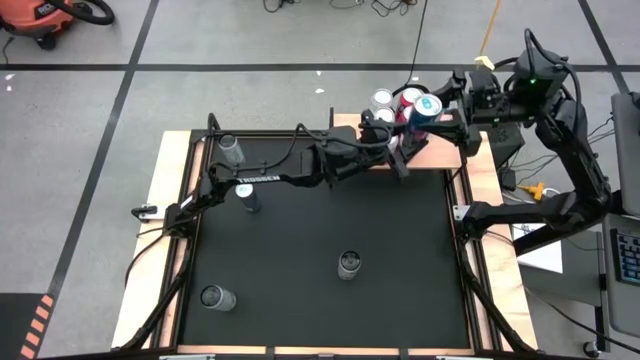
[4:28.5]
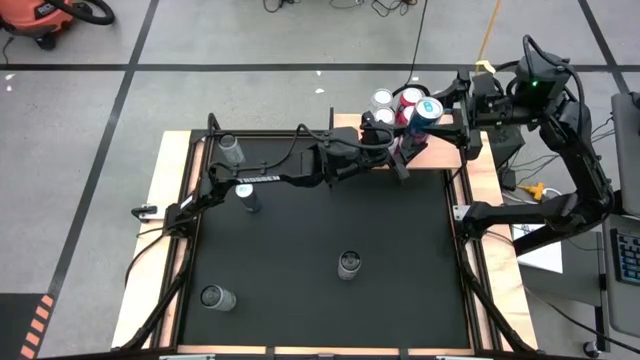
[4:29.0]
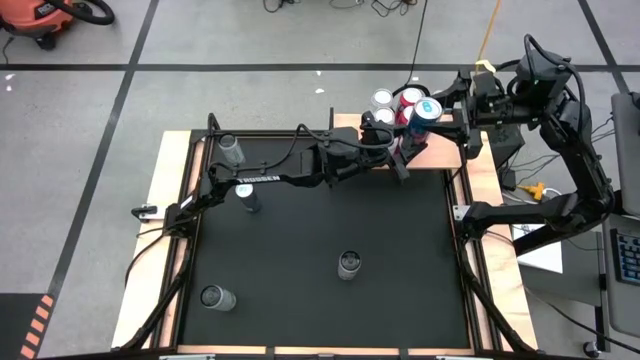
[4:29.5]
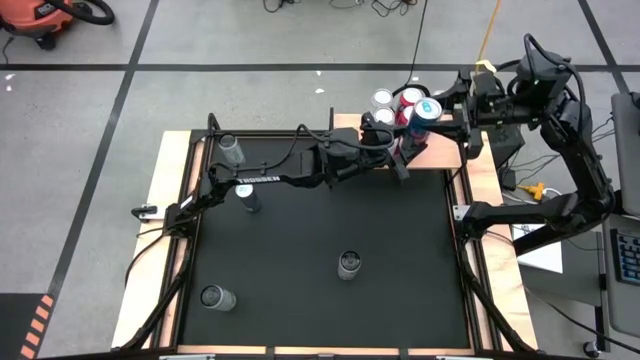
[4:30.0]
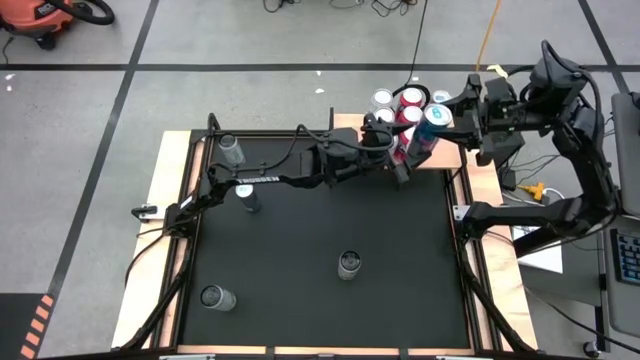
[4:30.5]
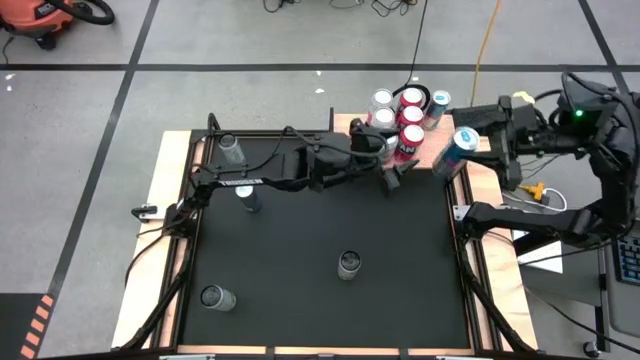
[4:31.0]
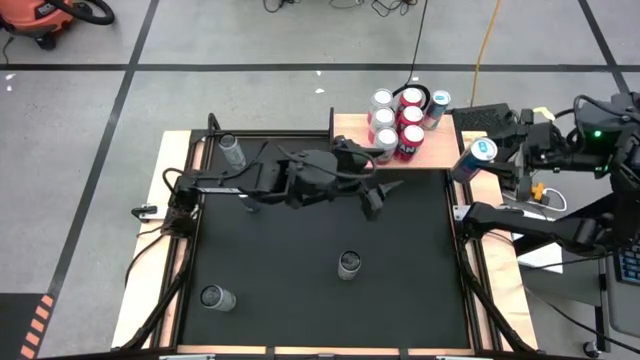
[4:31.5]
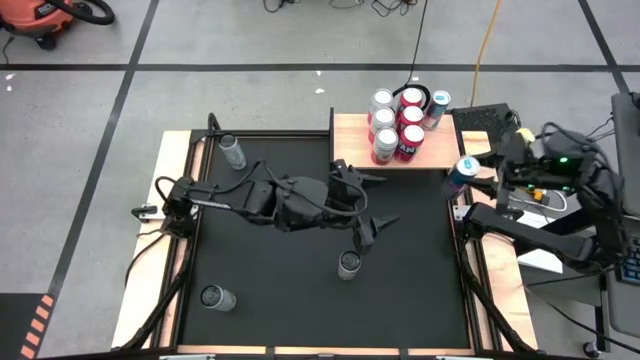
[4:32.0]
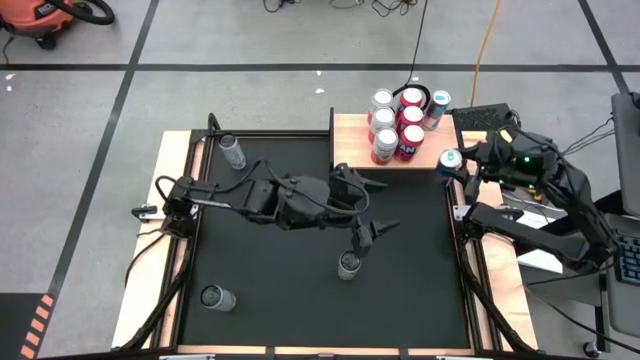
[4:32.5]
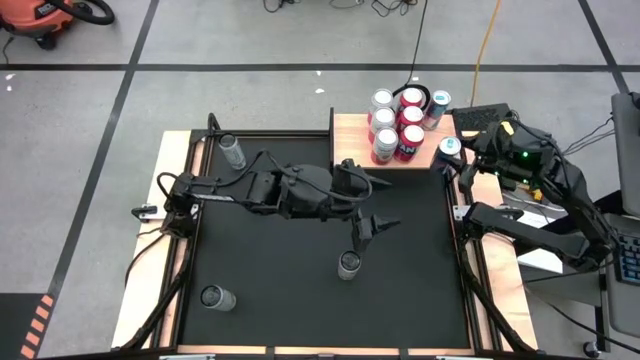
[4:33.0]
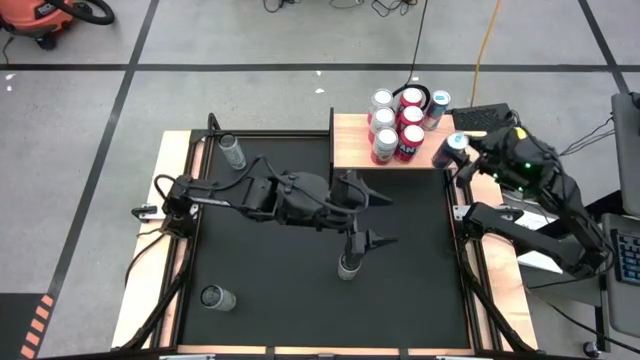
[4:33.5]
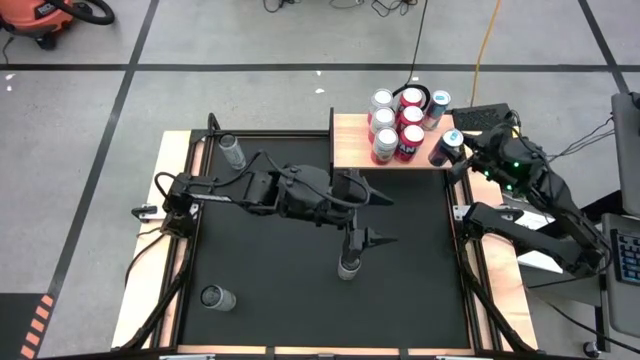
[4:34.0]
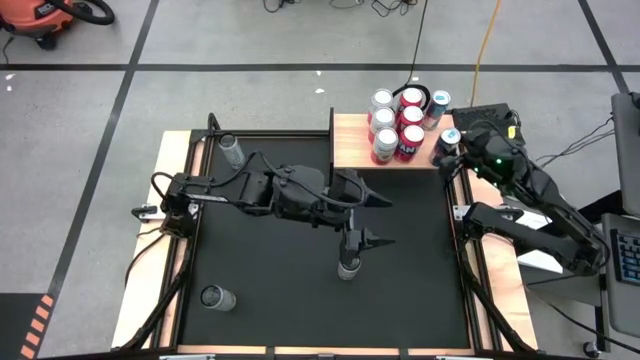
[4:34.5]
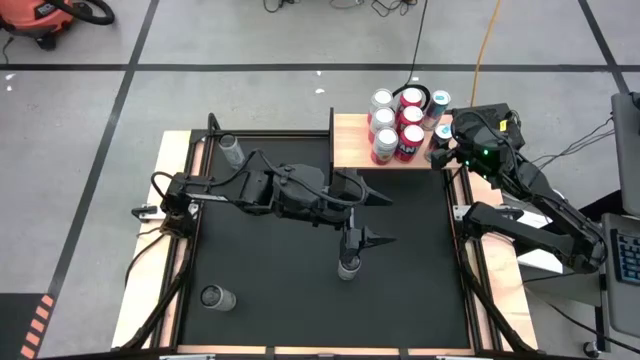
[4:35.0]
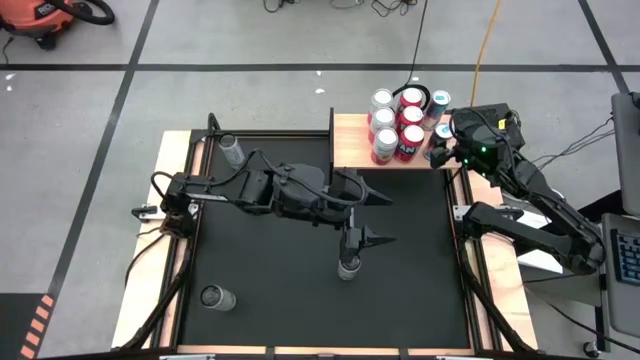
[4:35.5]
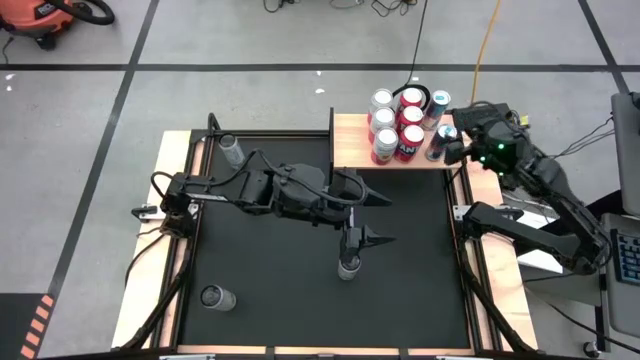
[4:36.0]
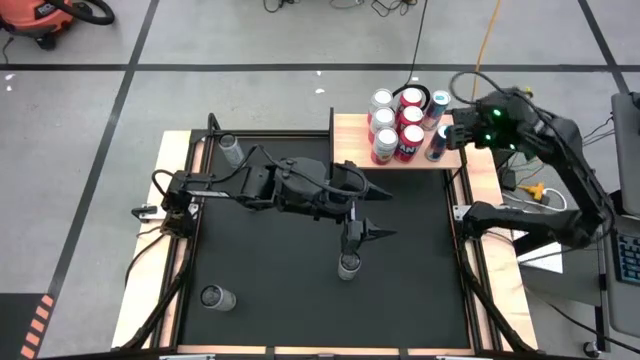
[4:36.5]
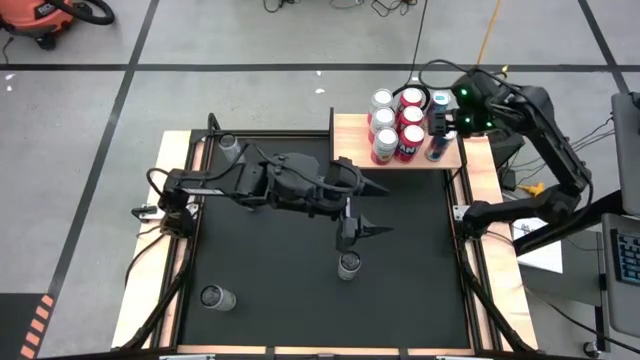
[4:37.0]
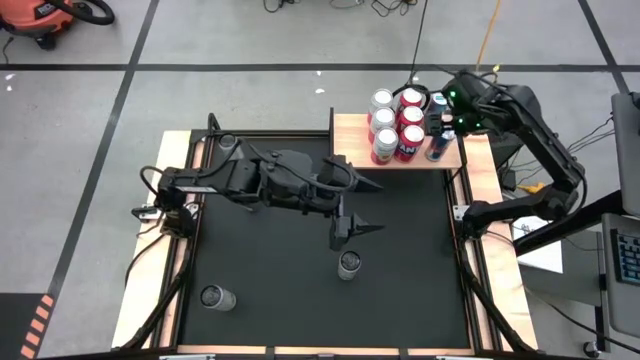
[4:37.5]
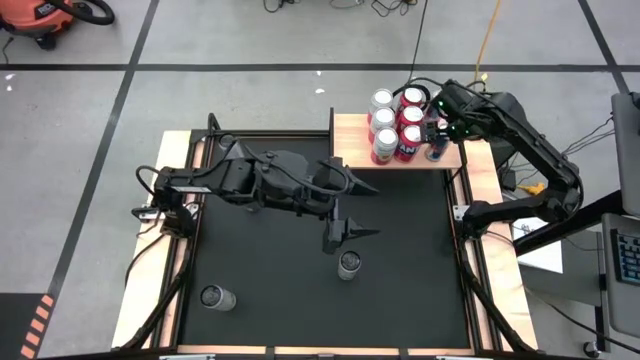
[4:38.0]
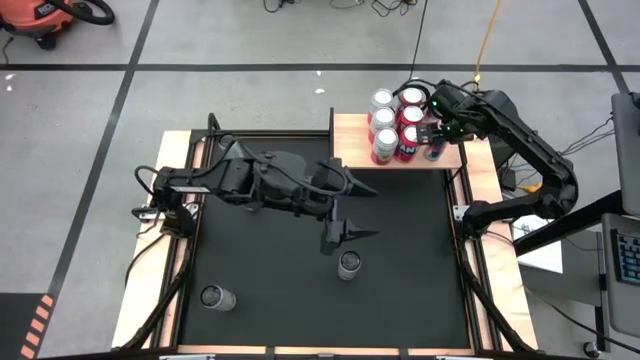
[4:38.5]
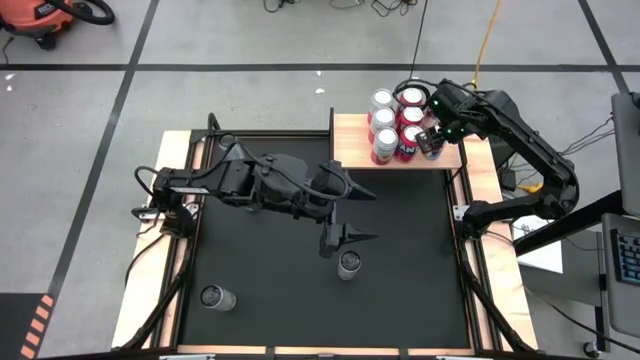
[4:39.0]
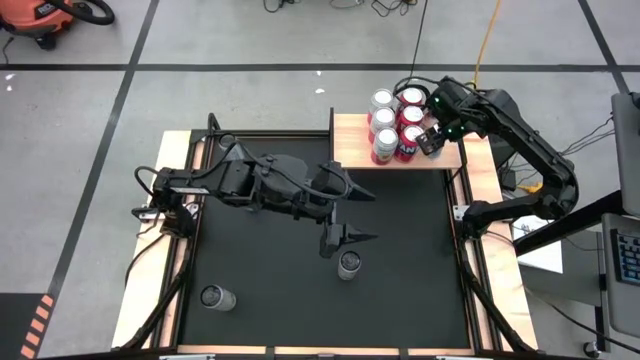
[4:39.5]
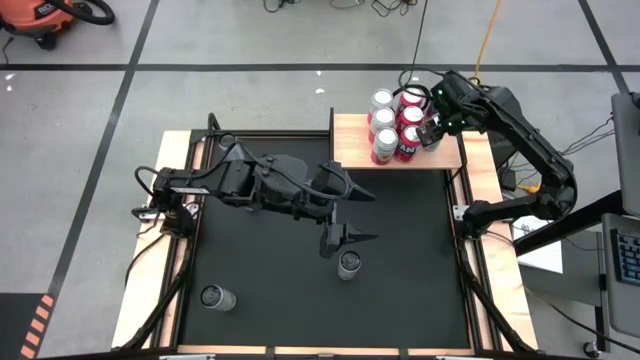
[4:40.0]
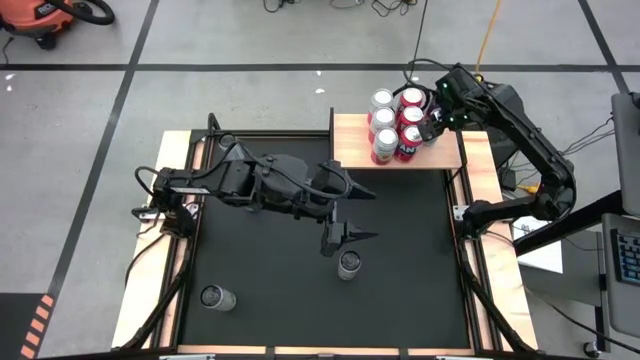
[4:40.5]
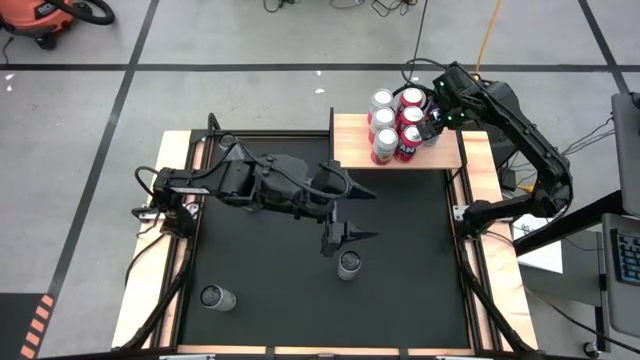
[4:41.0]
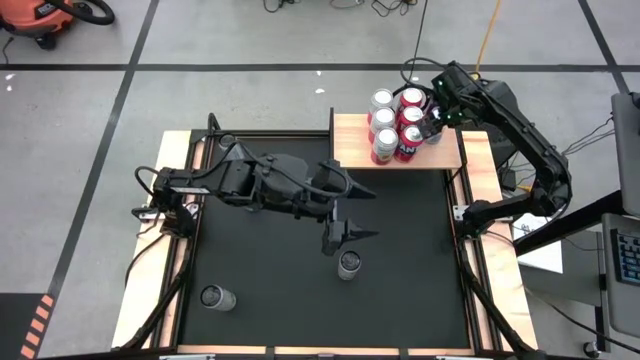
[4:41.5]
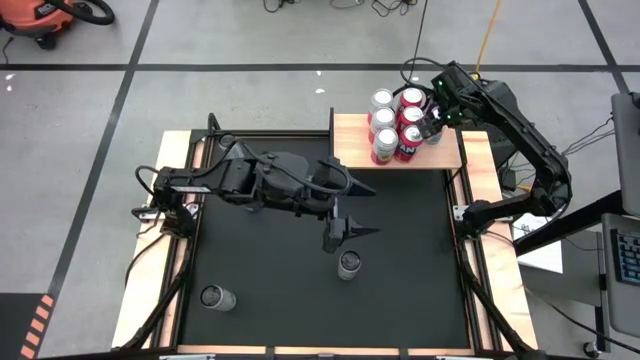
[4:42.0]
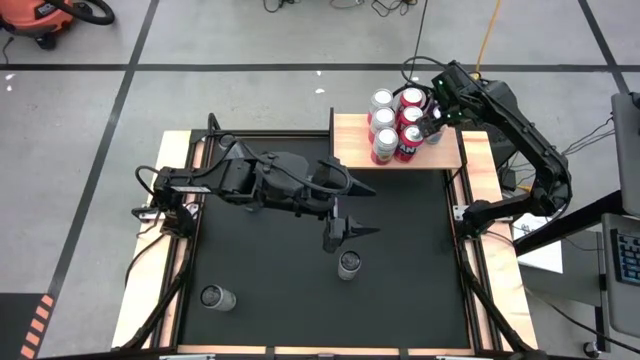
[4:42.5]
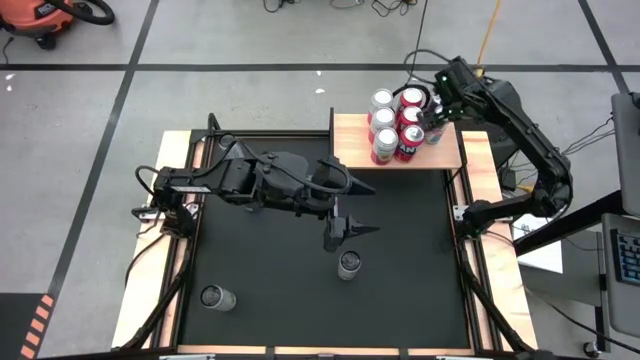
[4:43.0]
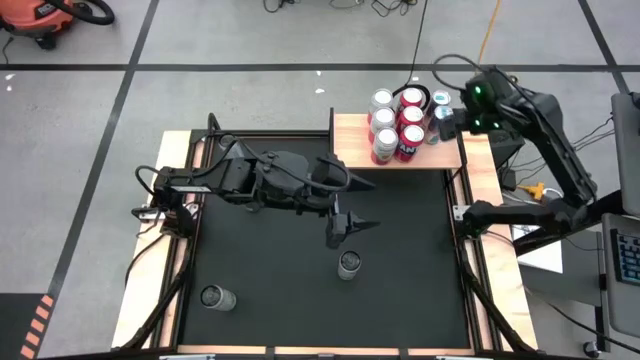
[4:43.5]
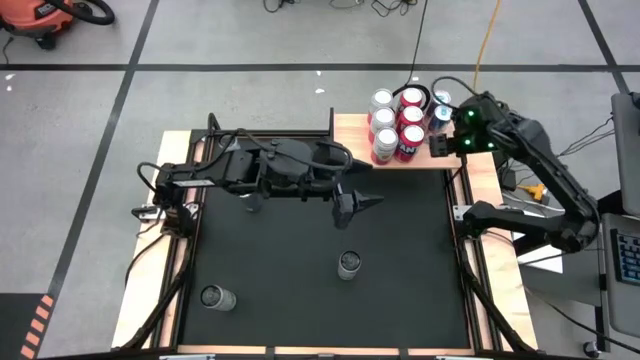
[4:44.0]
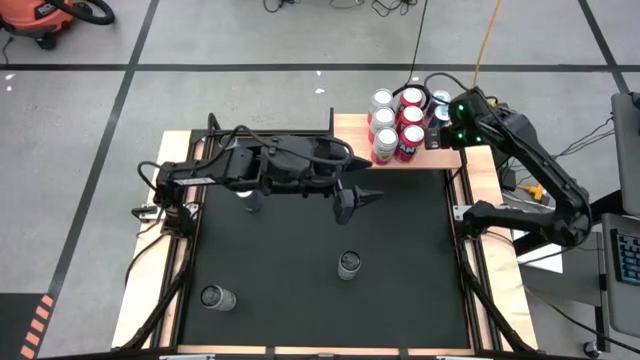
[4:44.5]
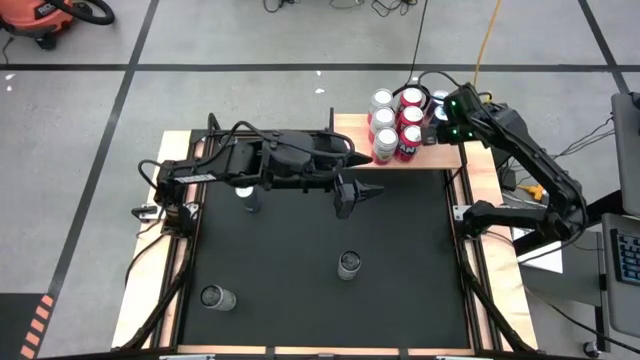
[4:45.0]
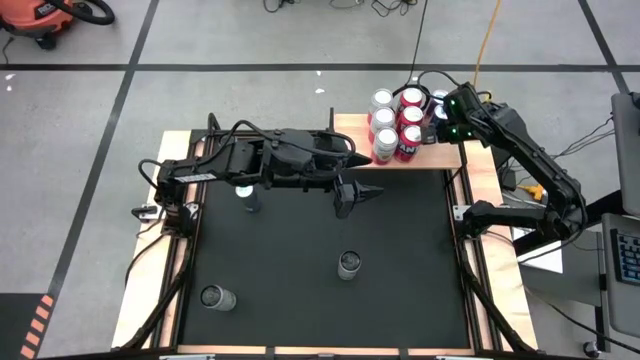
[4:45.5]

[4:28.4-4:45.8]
Task: Place canned beverage on shelf
Put the bottom blue soda can on the shelf aligned with the other blue soda can

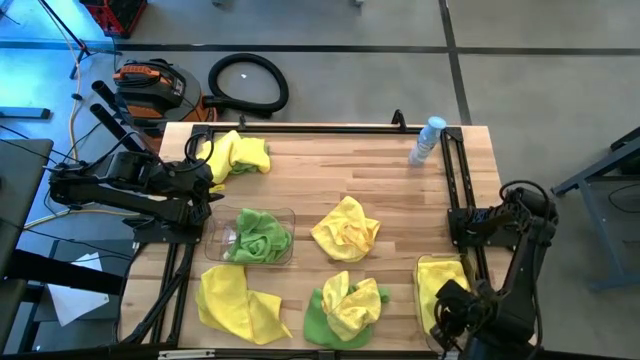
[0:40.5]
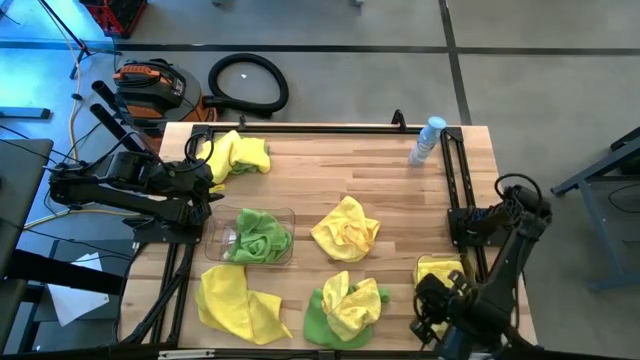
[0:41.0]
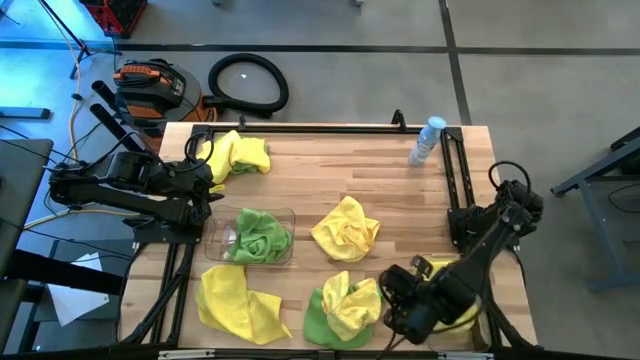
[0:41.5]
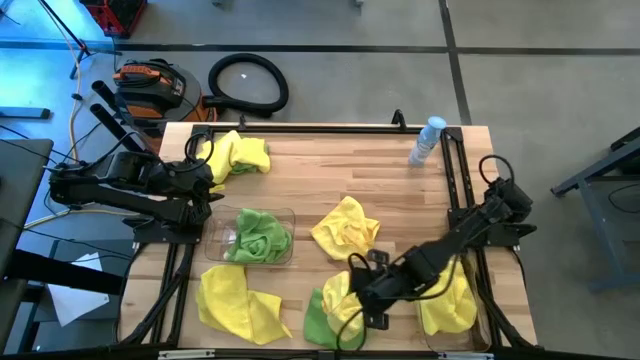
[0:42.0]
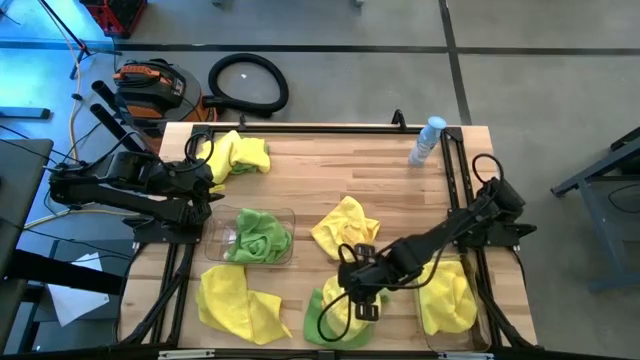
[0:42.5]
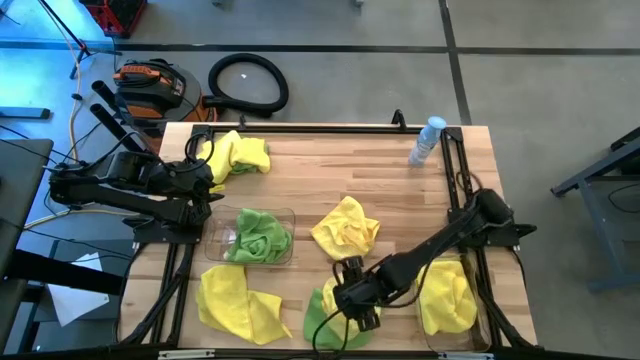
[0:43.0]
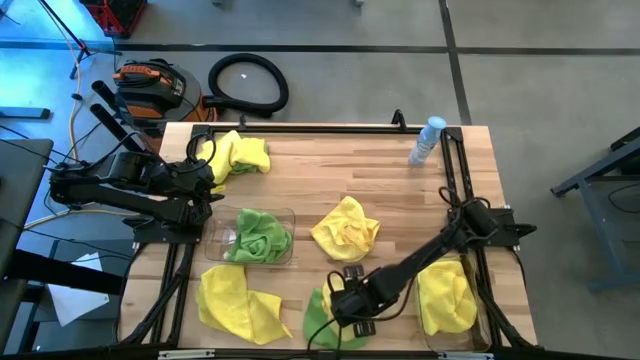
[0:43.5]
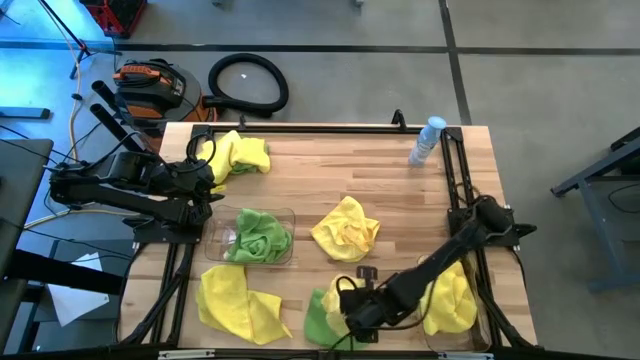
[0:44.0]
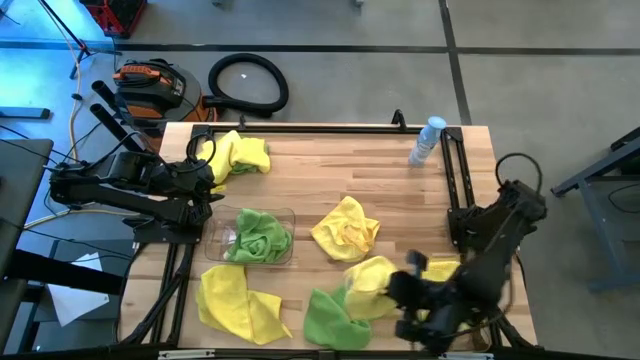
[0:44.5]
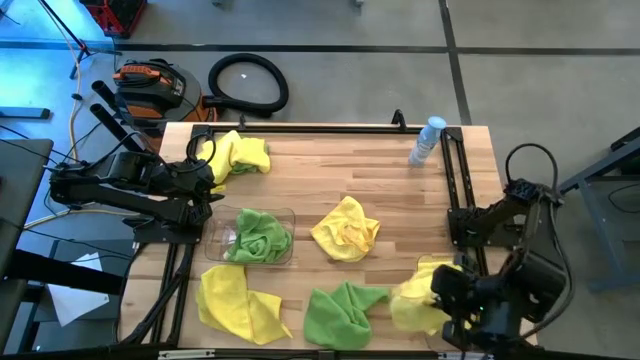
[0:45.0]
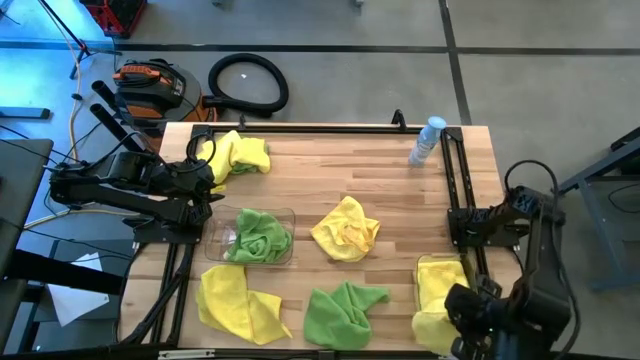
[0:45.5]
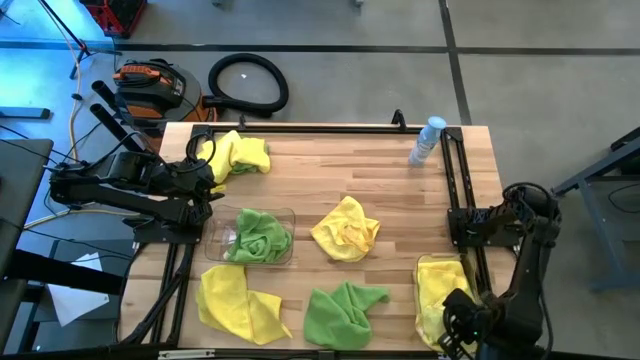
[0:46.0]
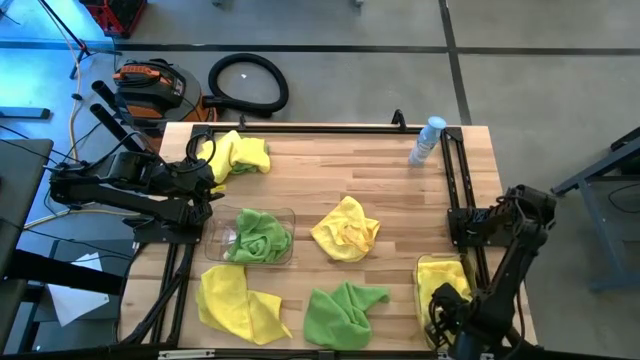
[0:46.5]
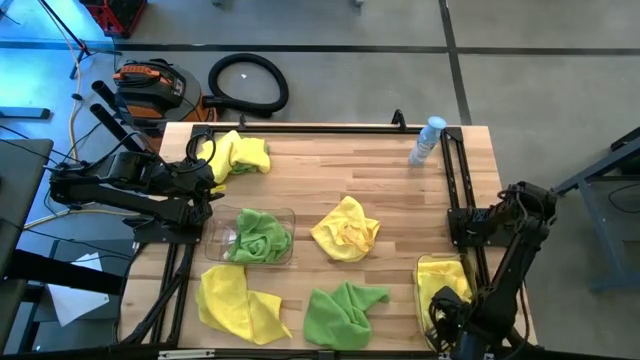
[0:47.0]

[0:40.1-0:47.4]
Task: Sort microfiber towel by color & place in baskets
Put the yellow towel into the right transparent bin
